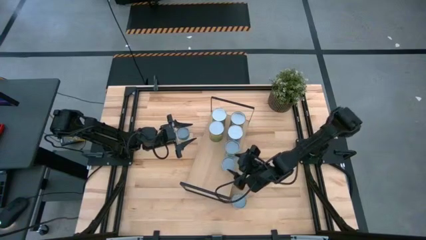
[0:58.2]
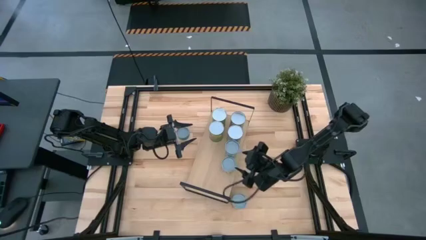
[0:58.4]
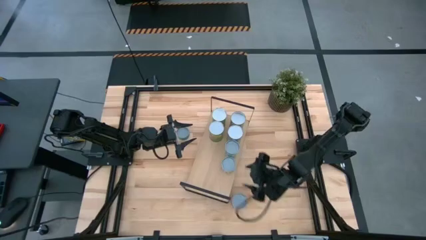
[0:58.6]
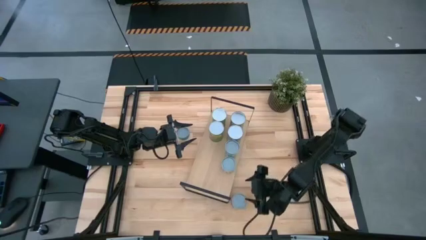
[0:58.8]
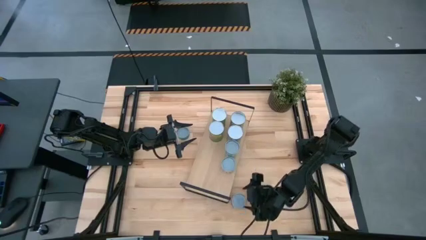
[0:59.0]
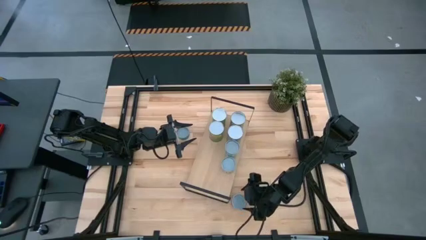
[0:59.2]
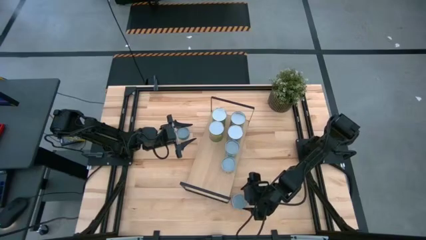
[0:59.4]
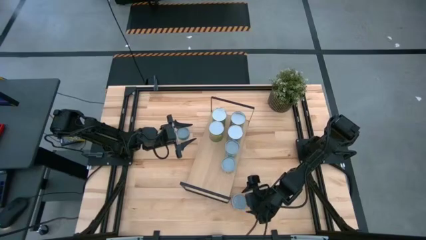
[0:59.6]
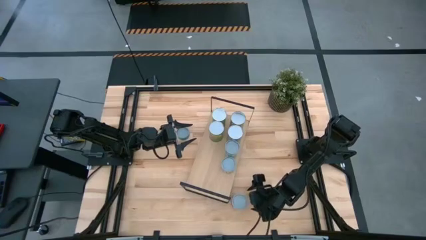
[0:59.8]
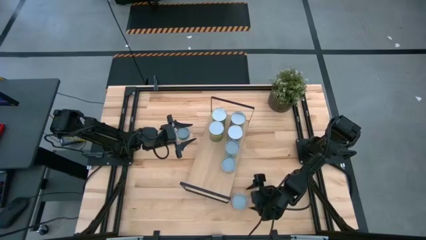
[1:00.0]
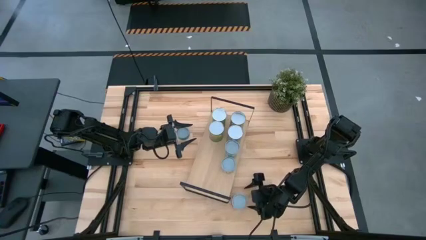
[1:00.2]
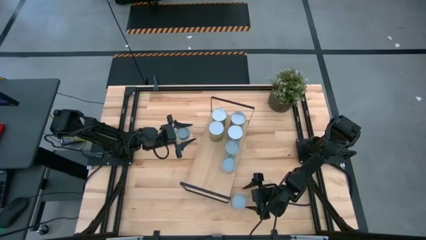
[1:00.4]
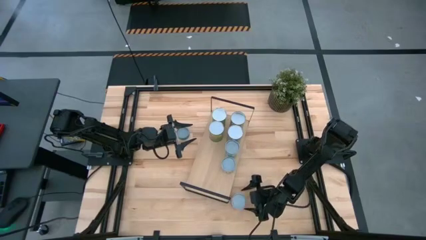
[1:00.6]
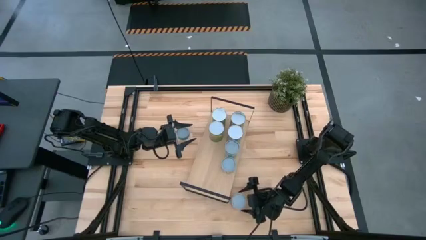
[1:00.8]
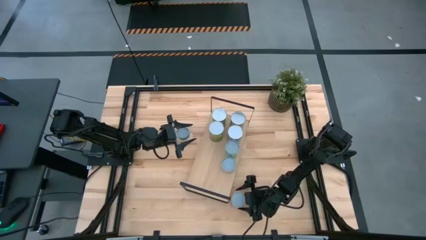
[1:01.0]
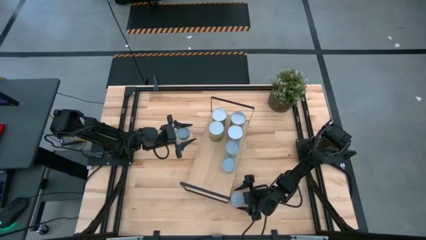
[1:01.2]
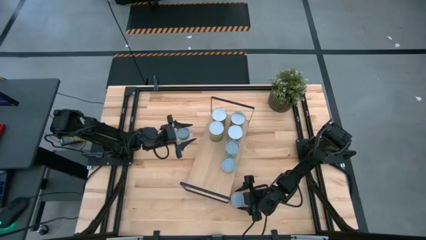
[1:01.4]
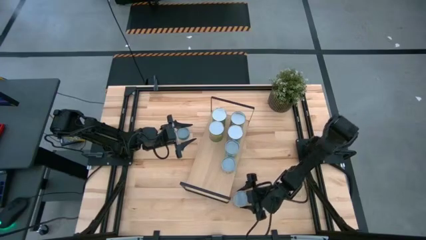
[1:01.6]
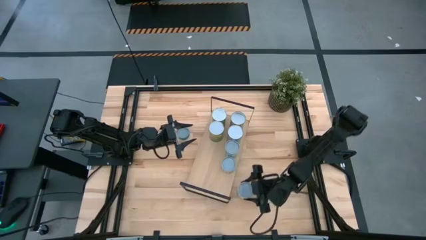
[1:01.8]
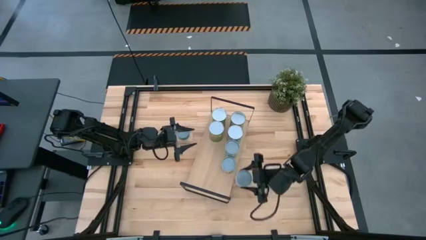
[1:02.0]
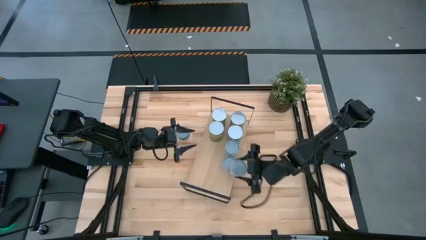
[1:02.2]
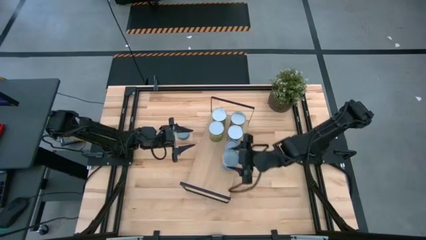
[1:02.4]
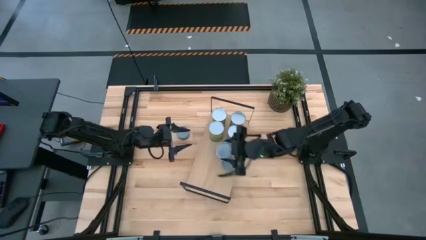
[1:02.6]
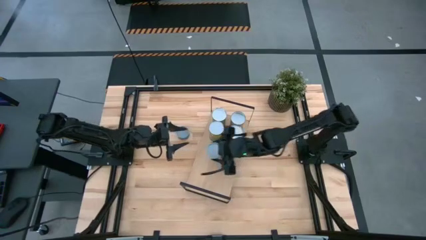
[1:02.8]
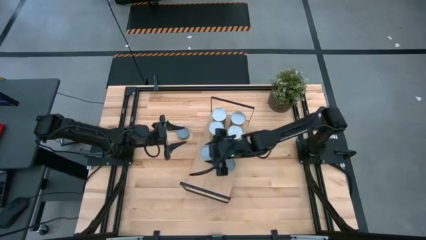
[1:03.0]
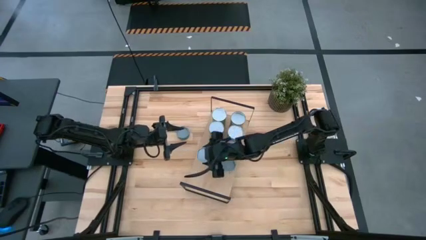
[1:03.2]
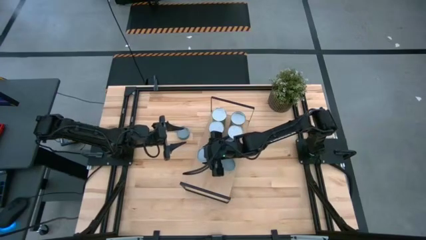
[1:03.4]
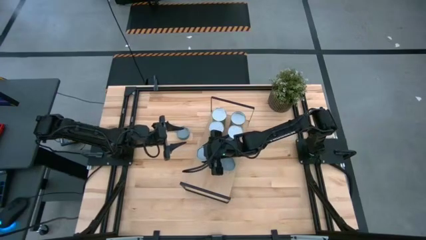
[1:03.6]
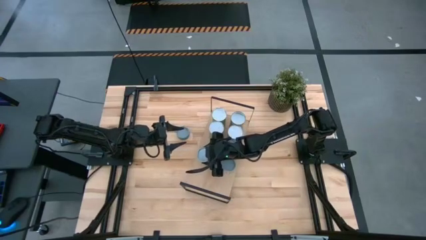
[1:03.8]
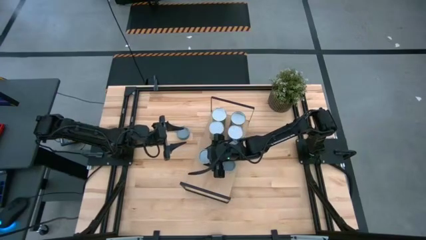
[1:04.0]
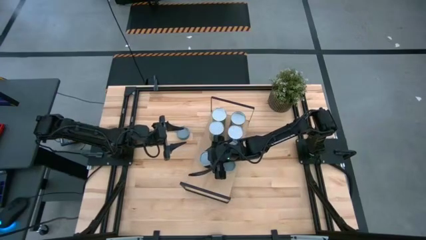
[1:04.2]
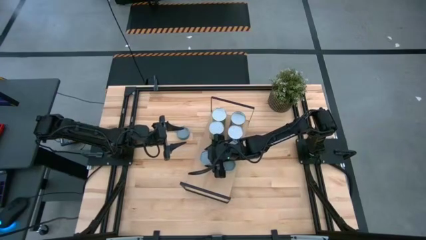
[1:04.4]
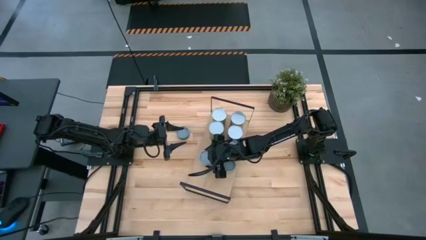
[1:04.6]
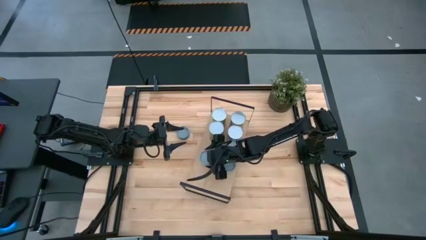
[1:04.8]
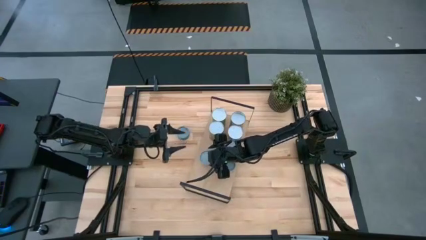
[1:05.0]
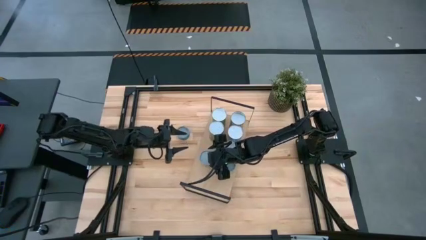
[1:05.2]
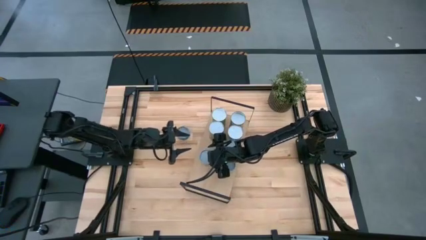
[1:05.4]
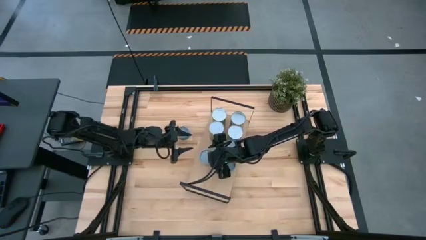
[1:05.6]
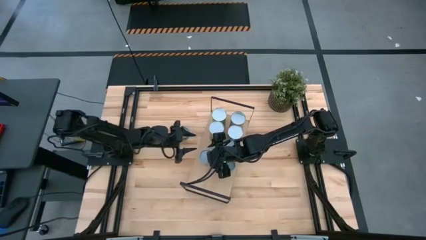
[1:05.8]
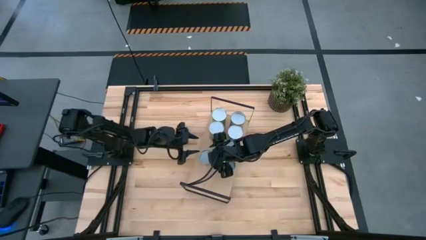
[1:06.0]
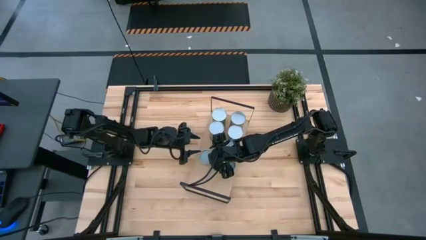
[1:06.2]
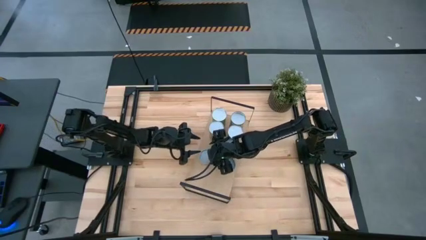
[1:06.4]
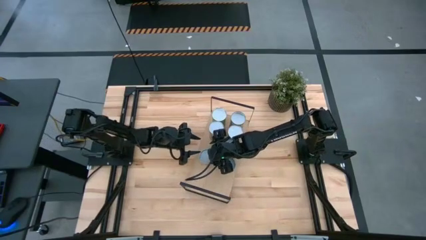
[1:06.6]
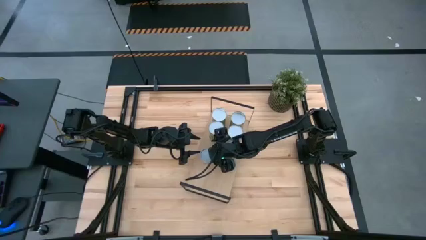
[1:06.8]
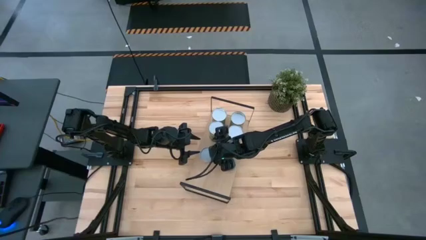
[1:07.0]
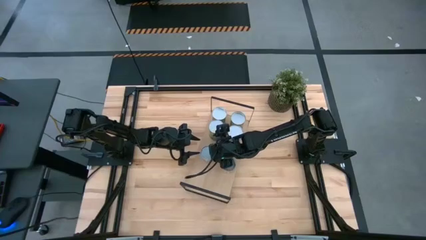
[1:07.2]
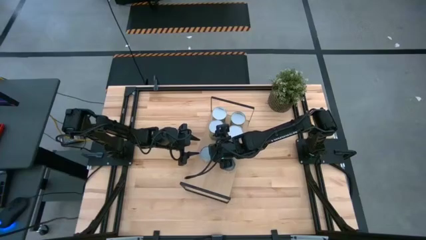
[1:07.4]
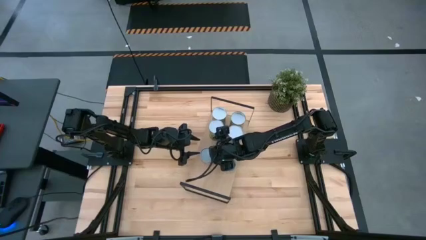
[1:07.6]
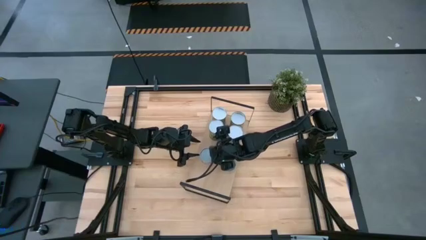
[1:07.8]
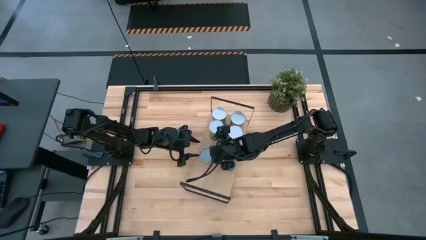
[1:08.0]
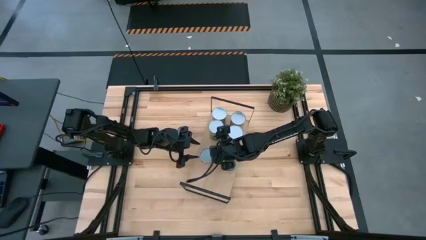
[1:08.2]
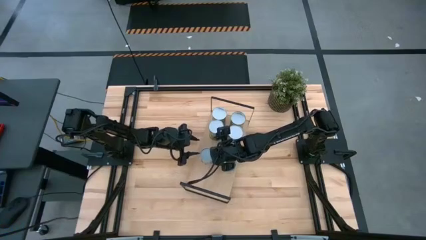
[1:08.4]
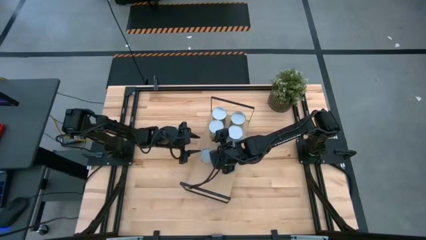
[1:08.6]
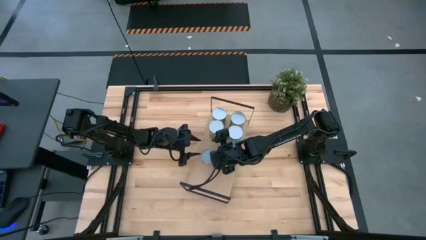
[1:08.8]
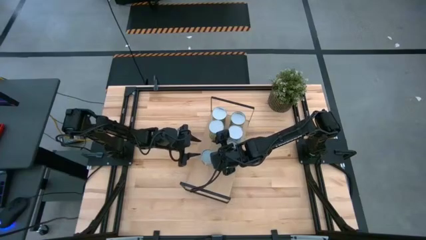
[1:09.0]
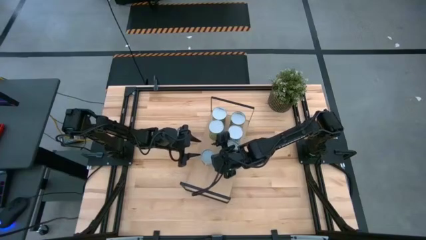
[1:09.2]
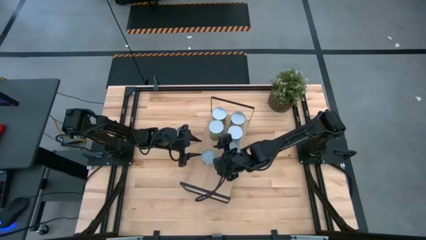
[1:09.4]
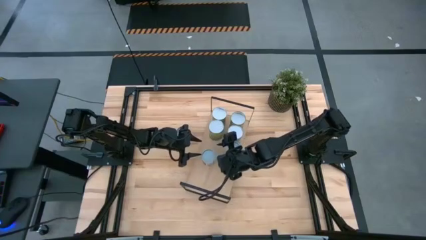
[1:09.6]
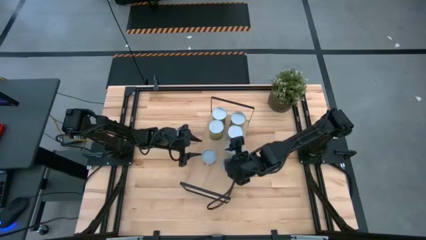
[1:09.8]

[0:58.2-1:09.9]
Task: Pick and place cans onto a shelf
Put the canned diced tomatoes on the shelf

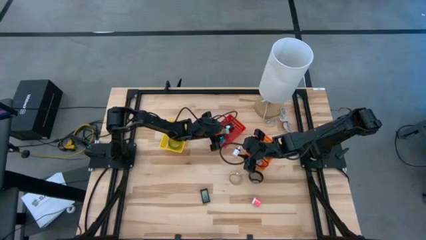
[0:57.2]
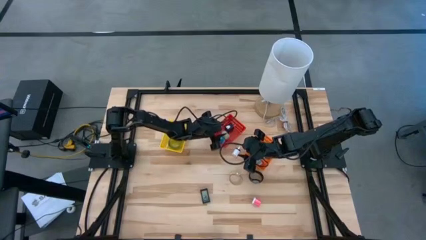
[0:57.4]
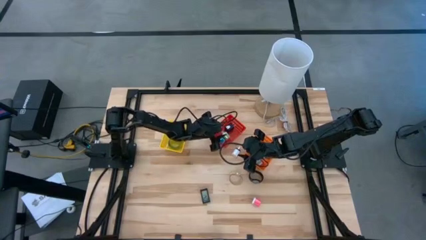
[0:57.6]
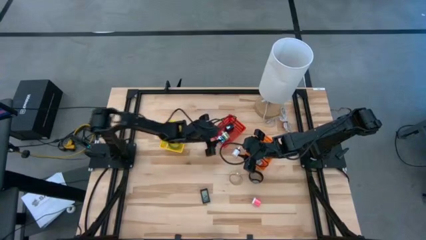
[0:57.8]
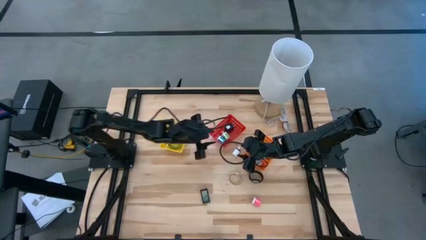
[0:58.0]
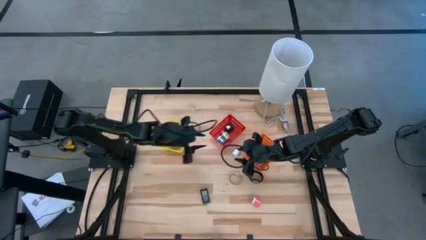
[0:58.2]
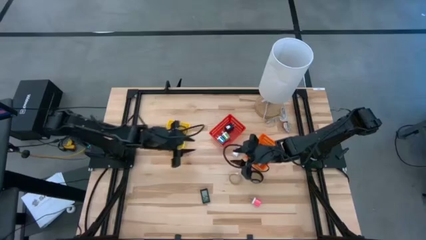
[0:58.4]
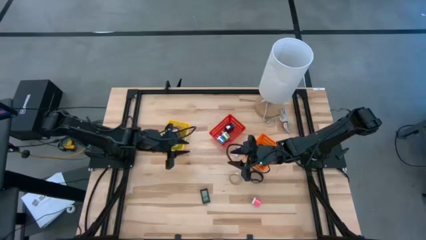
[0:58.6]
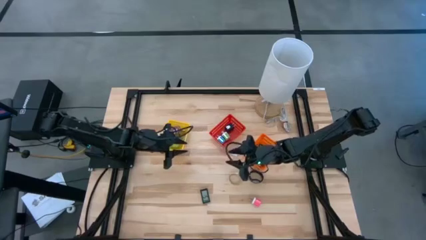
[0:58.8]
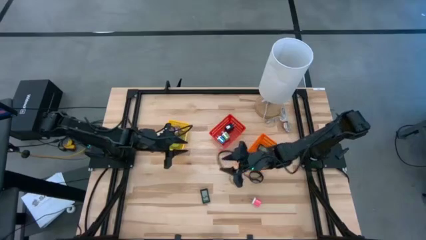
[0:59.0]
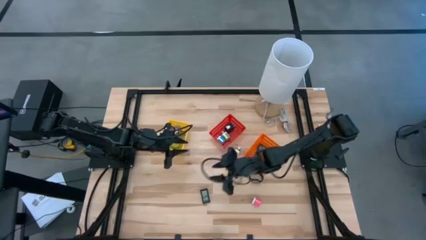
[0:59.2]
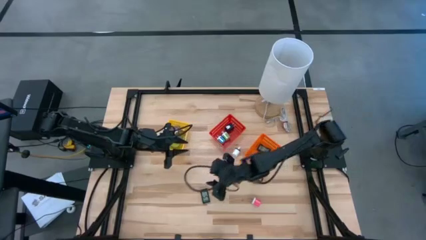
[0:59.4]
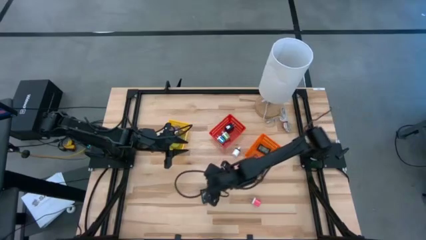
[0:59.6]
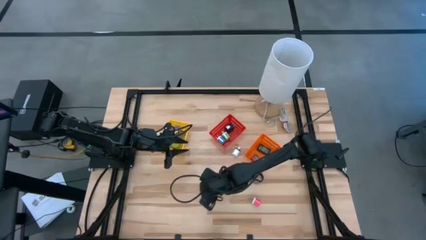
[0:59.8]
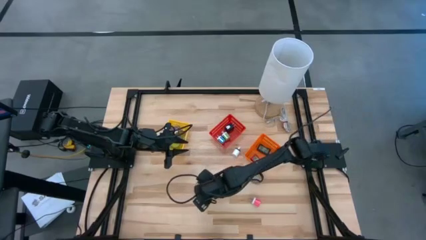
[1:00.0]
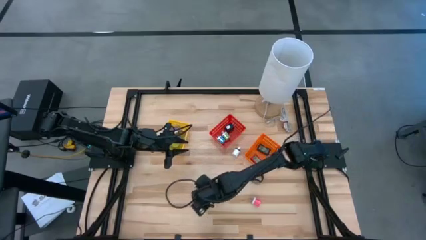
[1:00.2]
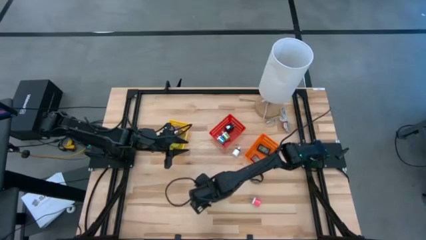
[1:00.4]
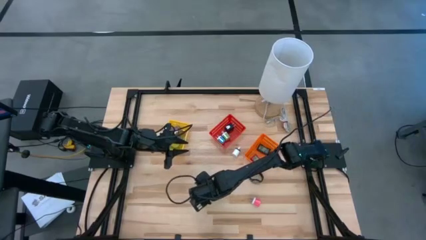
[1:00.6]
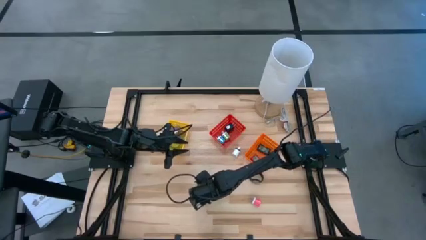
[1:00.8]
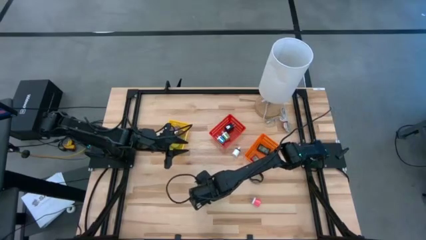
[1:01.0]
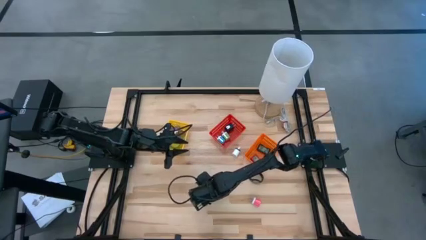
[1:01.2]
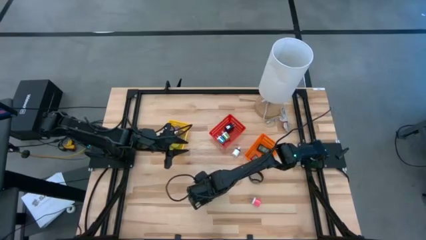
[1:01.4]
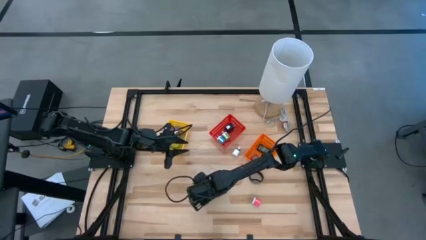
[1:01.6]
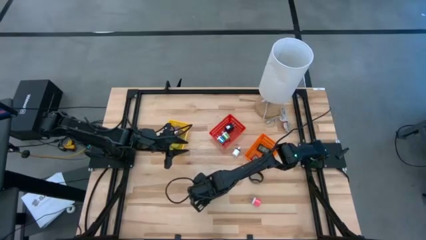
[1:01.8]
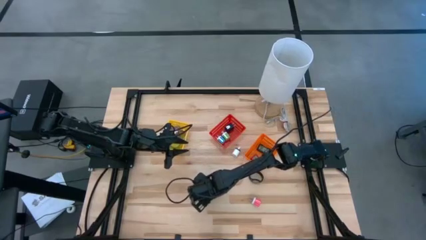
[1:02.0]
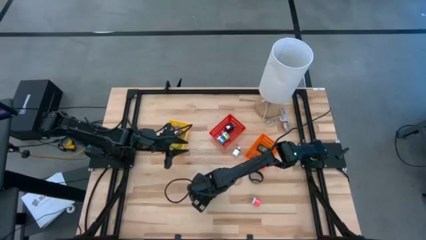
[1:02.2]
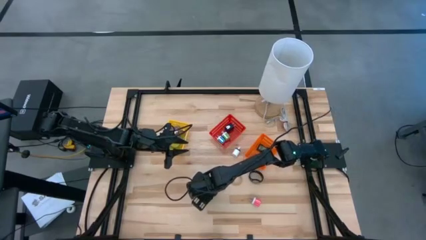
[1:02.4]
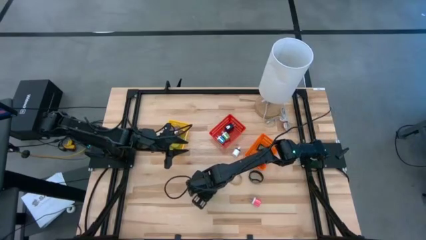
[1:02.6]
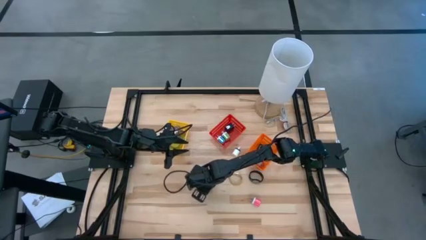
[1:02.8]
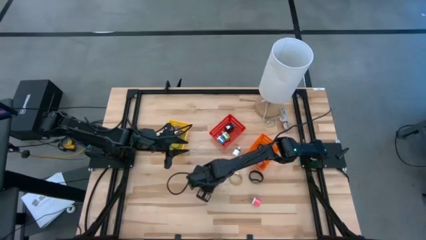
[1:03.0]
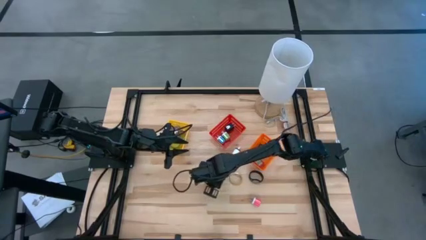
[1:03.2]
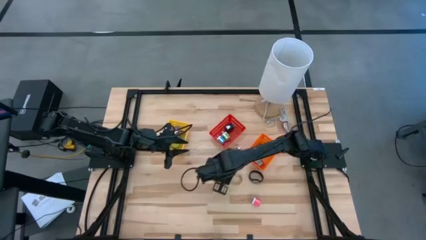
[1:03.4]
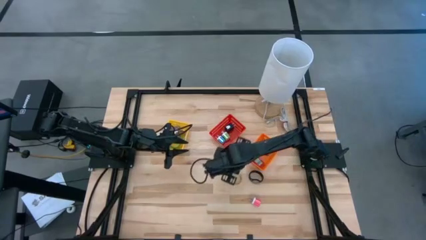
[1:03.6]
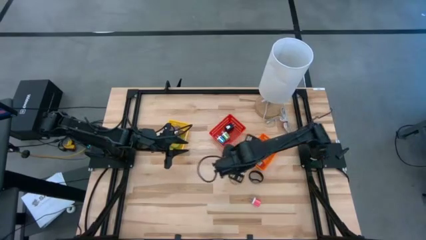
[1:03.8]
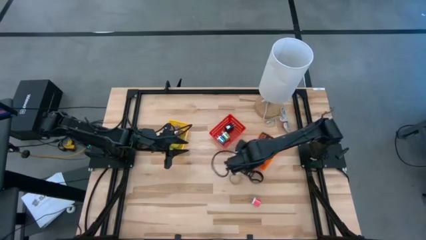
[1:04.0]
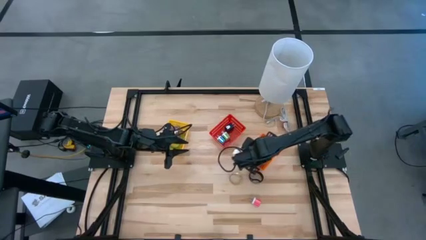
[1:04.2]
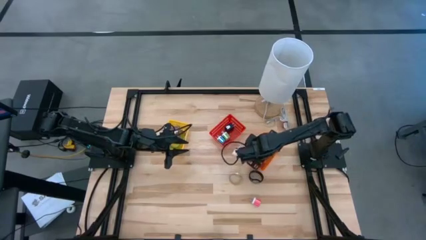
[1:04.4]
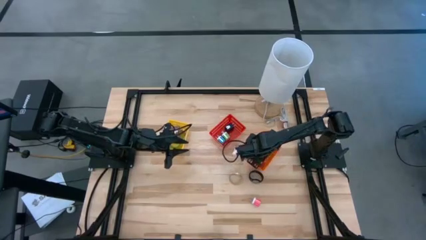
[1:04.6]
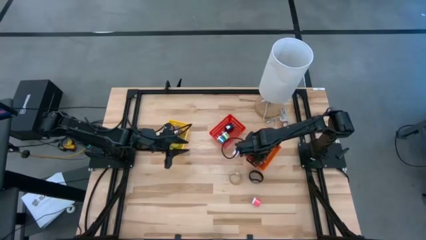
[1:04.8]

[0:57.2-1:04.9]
Task: Pick & Place Office items
Put the black digital clock into the orange bin
